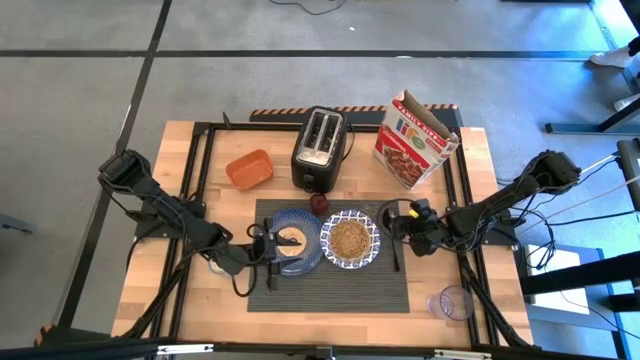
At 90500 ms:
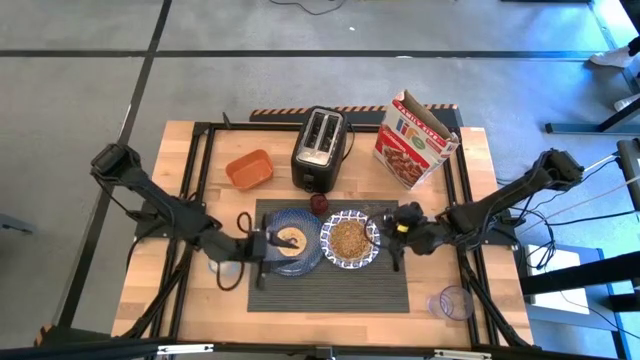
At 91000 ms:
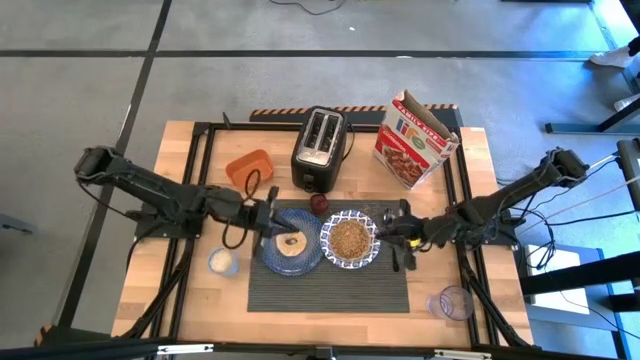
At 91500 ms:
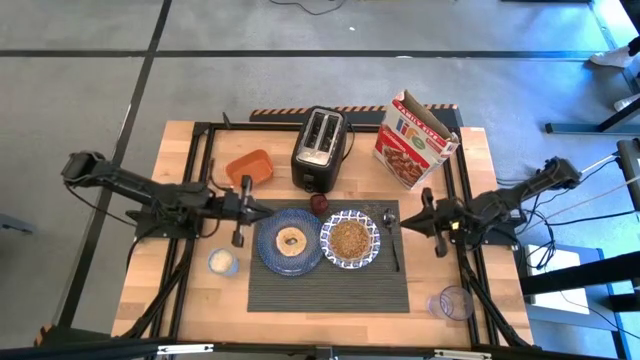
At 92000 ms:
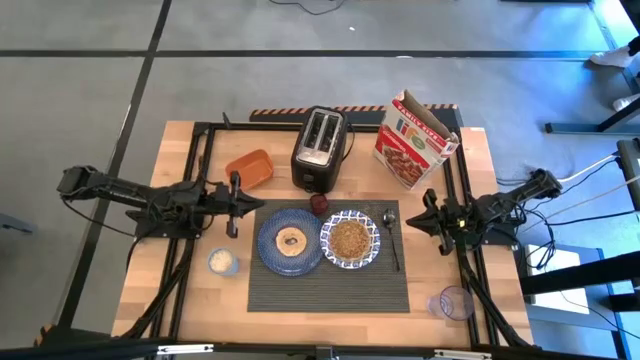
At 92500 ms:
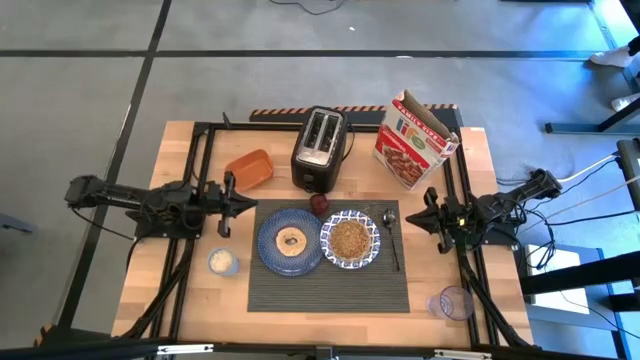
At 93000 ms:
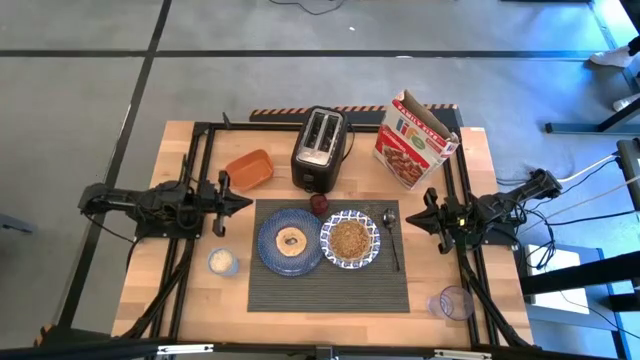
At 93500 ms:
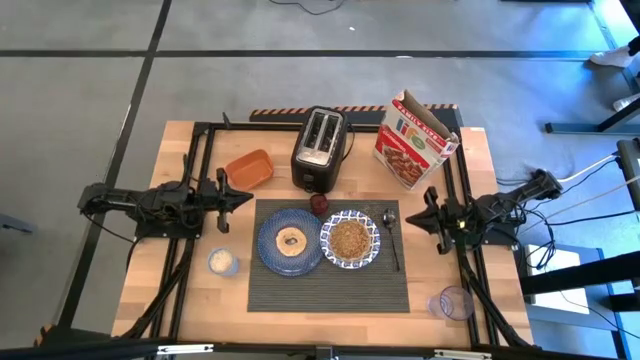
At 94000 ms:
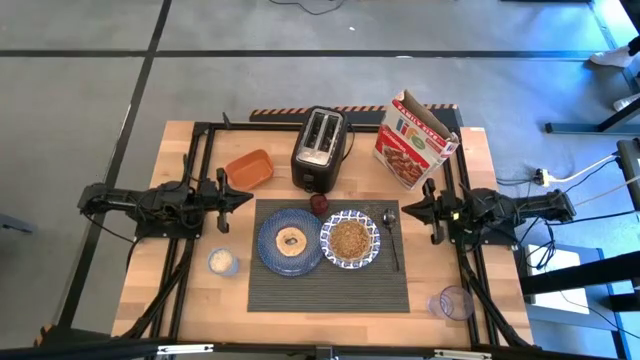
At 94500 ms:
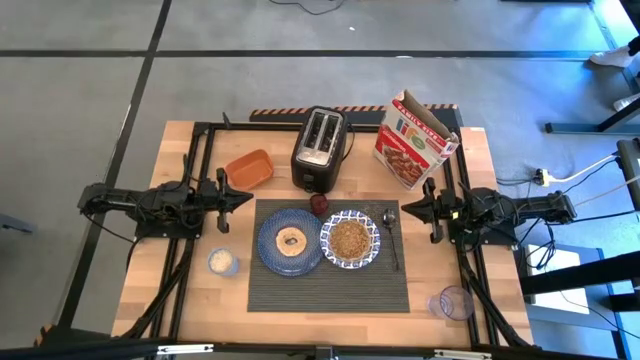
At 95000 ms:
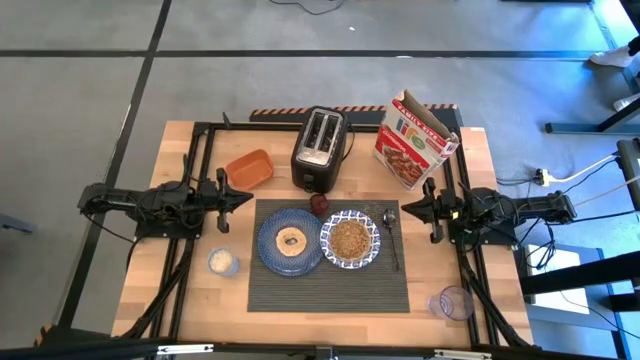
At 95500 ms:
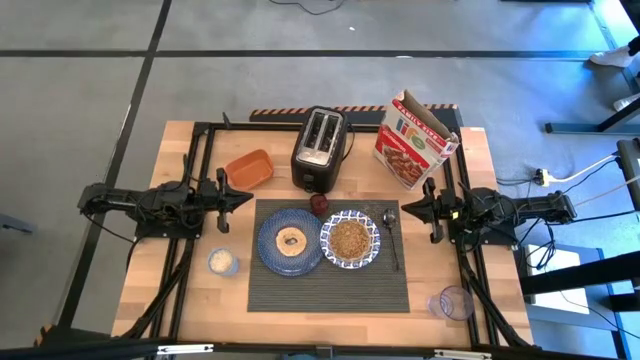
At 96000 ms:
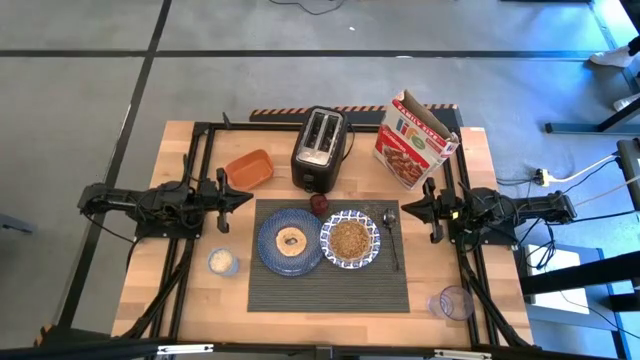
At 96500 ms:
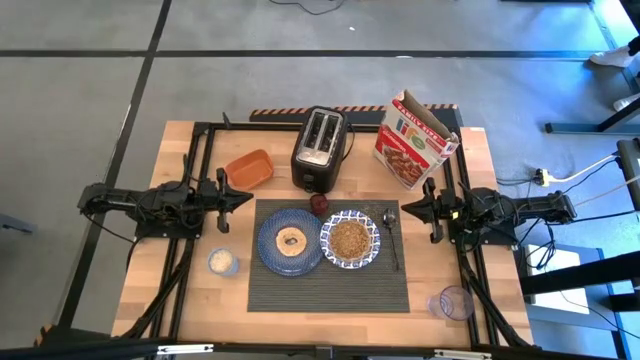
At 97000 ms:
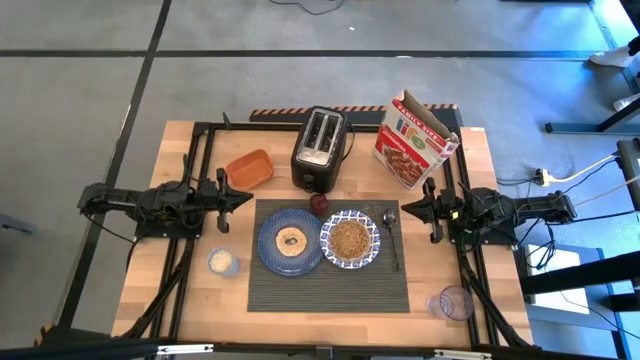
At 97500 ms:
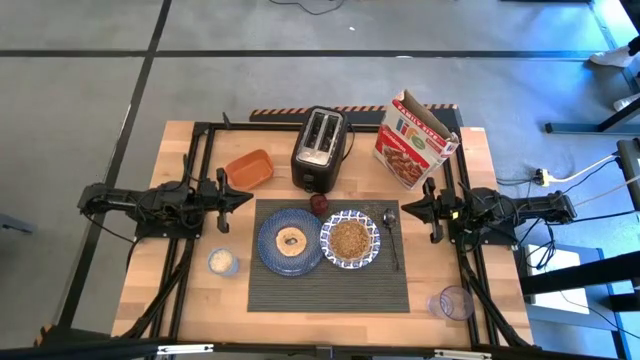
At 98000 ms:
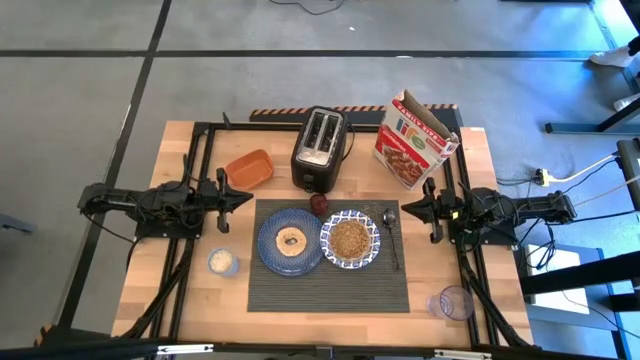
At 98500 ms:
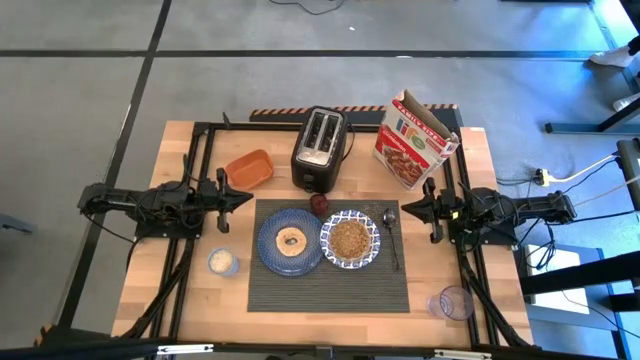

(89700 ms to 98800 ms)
Task: Arrange a breakfast setting
Return to Home Position

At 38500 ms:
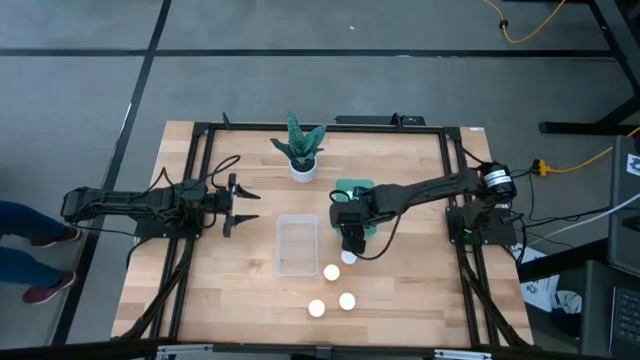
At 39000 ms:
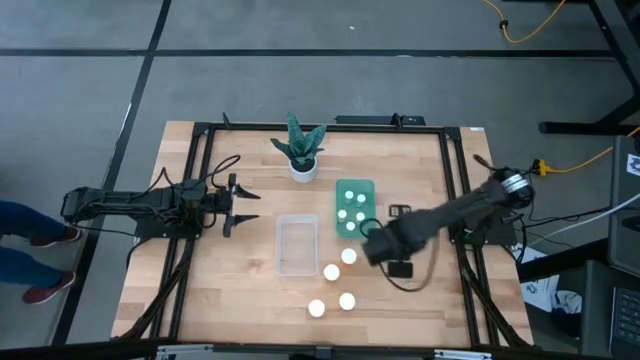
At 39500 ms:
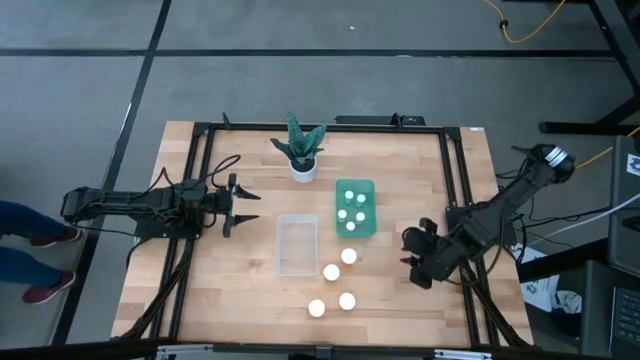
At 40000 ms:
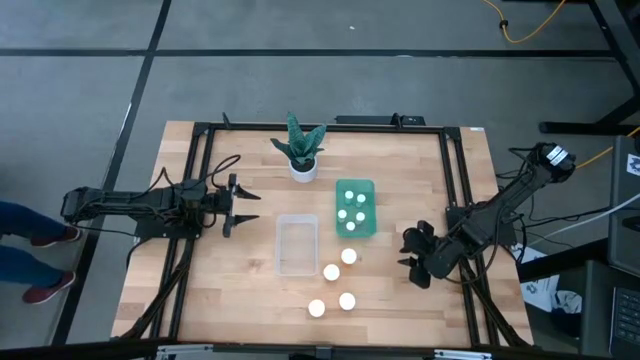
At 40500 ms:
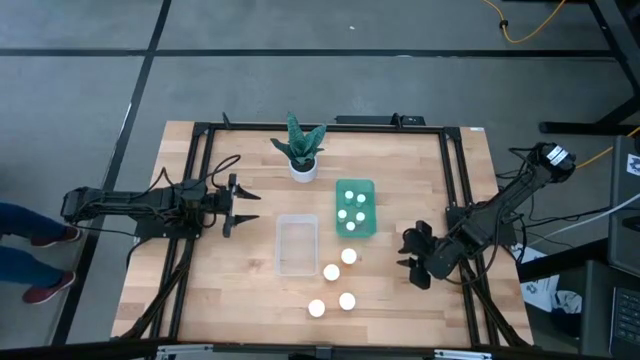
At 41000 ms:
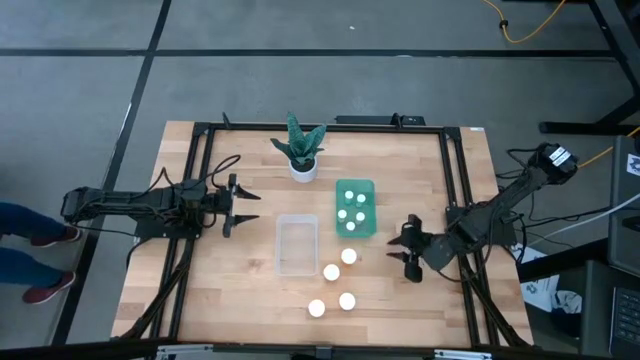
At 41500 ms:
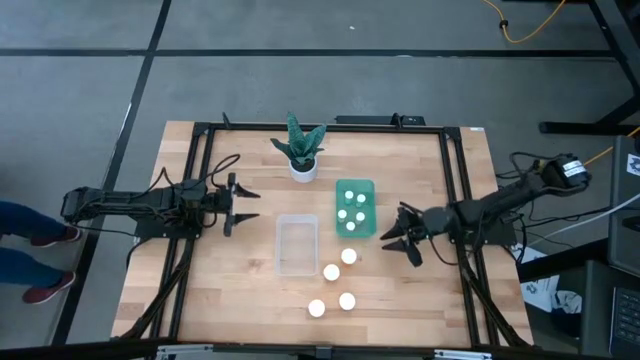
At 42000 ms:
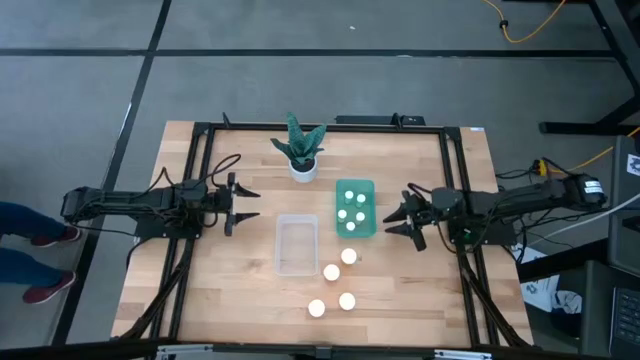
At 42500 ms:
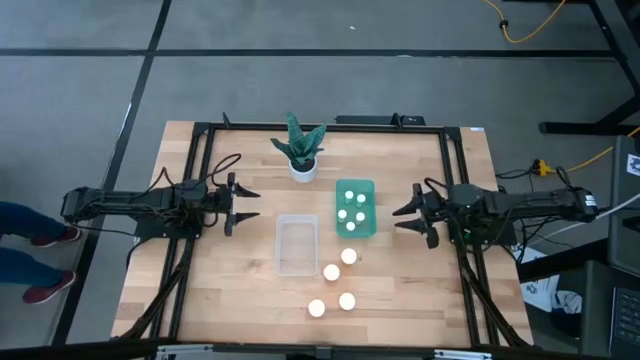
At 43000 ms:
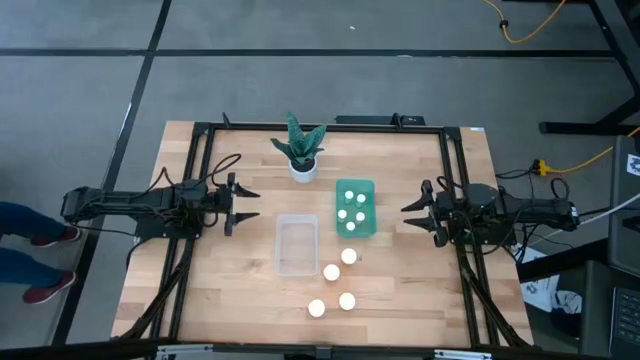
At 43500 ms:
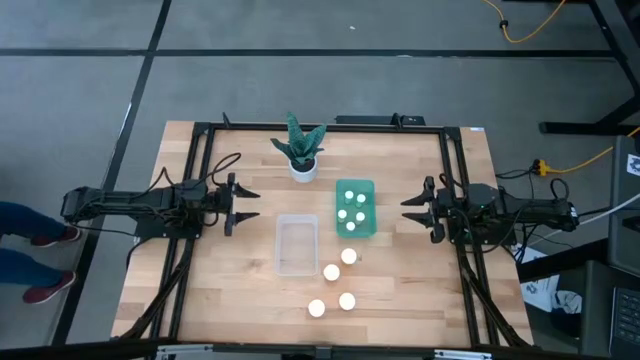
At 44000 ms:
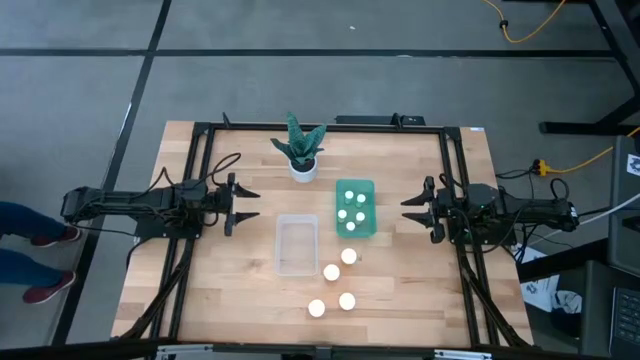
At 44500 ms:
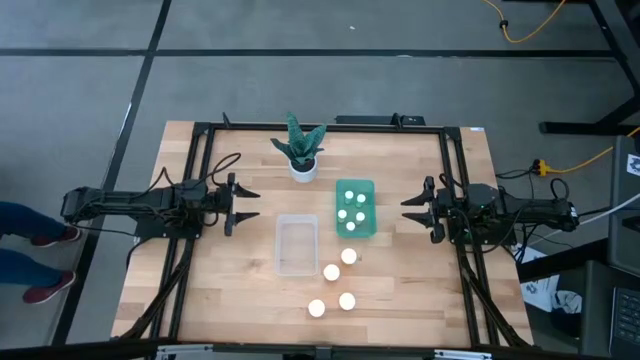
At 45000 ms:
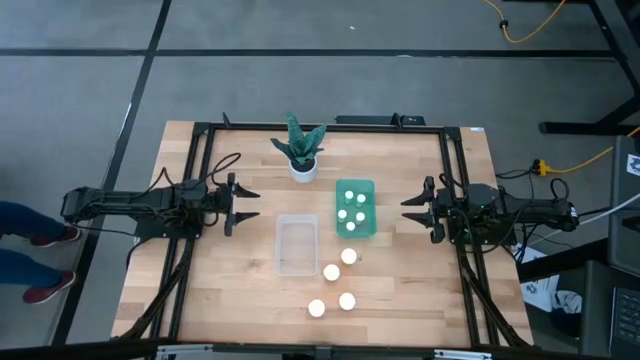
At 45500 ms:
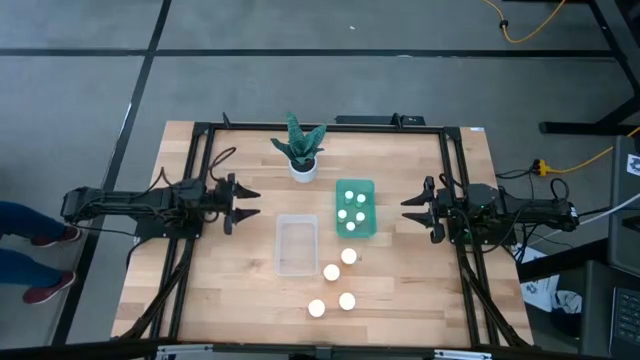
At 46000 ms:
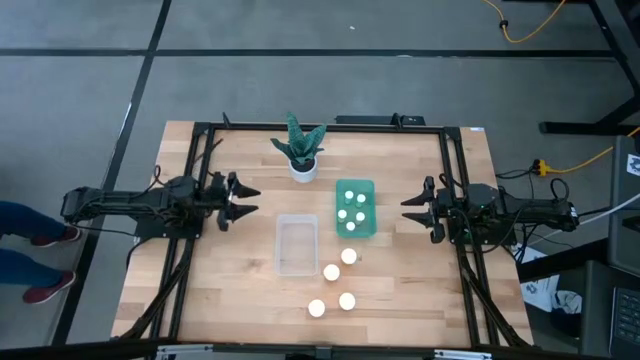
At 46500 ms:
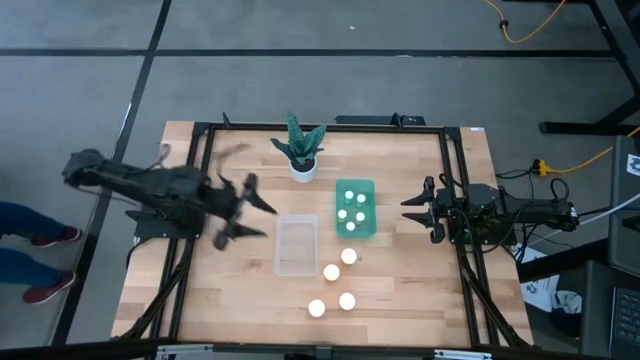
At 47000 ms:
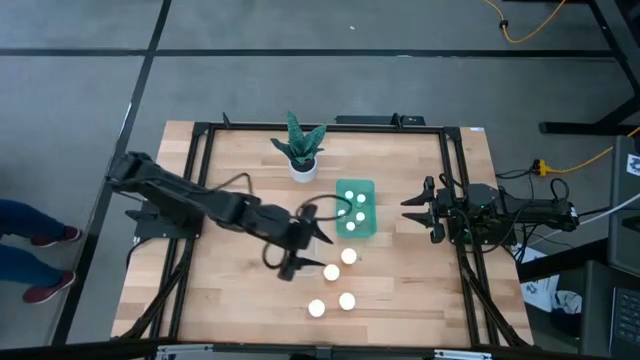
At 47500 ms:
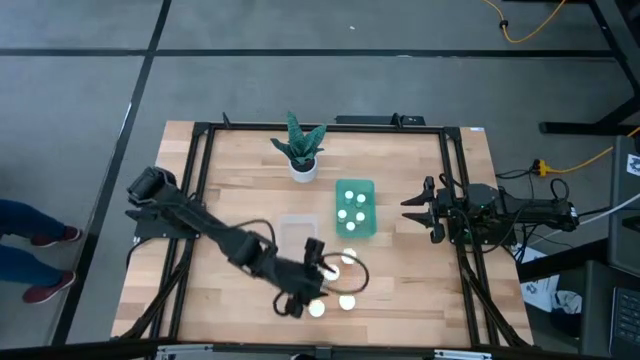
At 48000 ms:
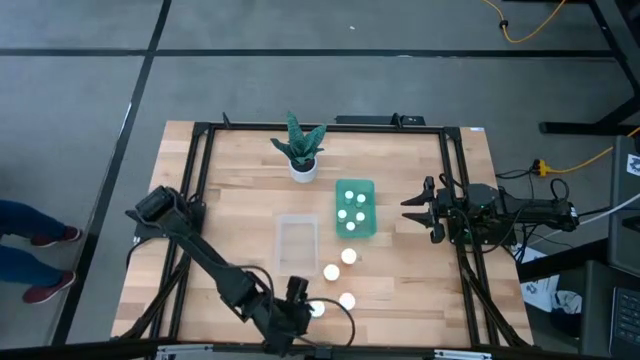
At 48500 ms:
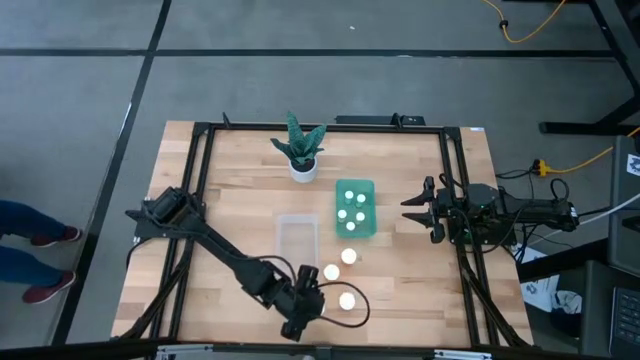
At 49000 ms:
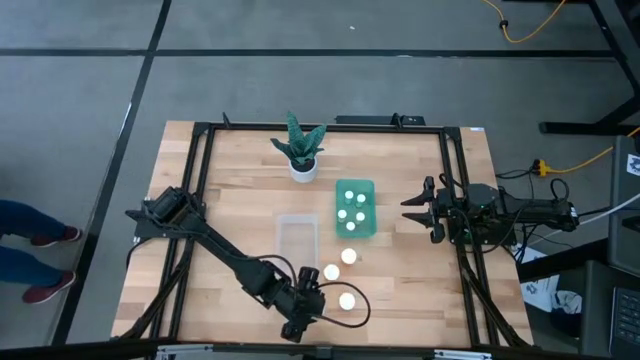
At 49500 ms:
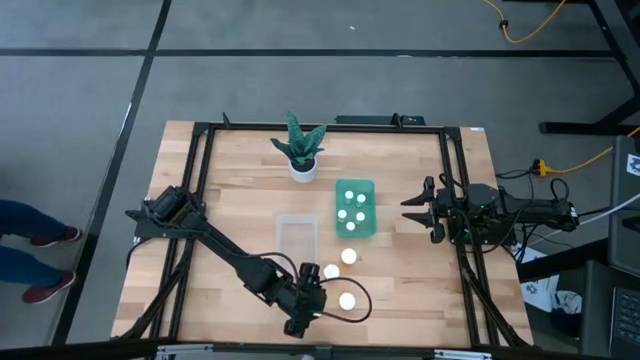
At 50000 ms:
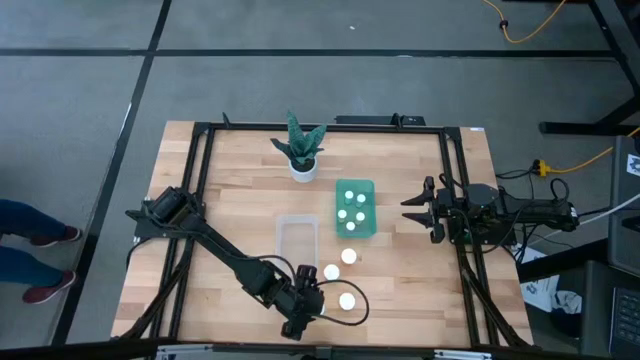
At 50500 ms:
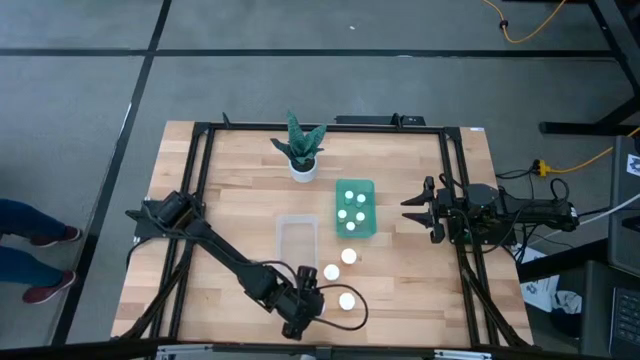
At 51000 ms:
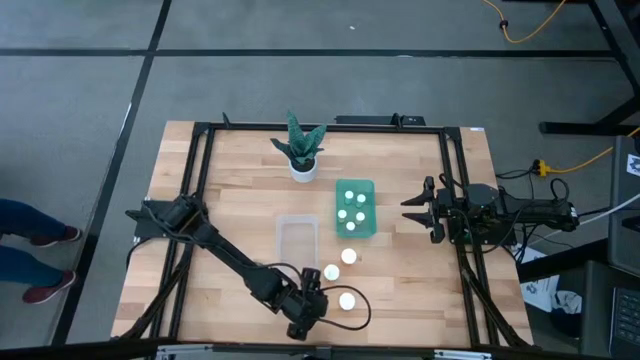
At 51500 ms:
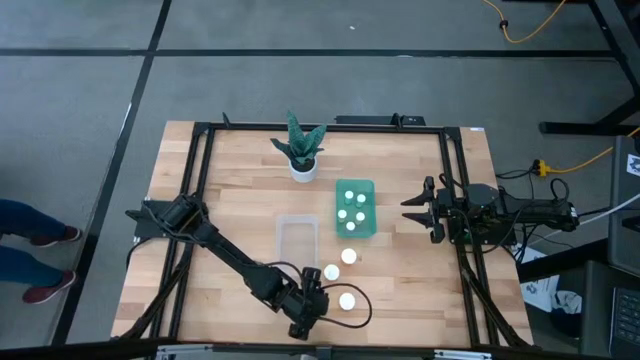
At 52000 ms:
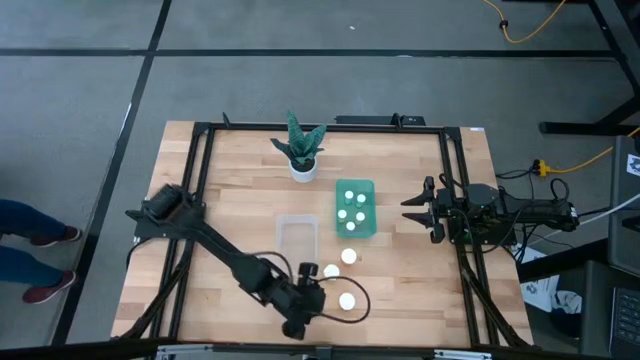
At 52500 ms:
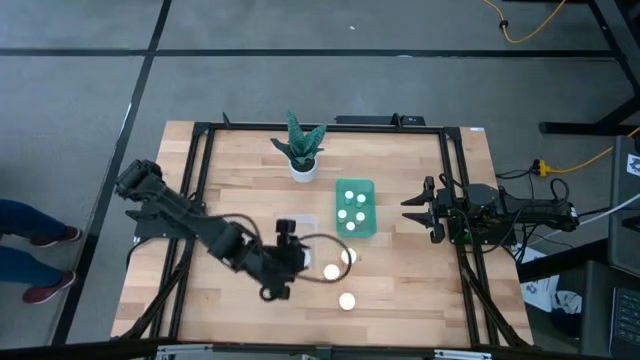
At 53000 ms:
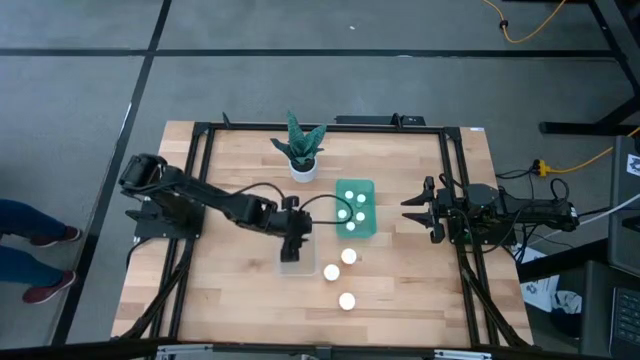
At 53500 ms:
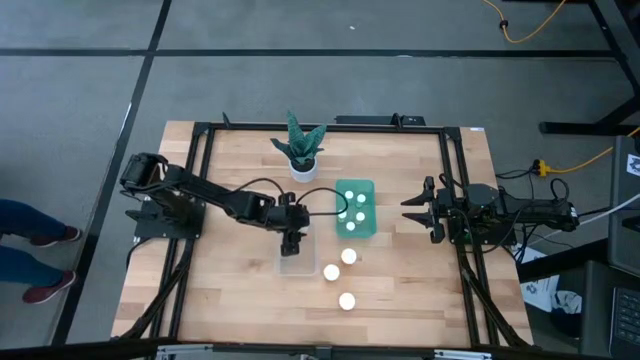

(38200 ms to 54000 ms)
Task: Pick and place medicine bottles into bin by pill shape (circle, oval)
Put the large orange pill bottle into the transparent bin
